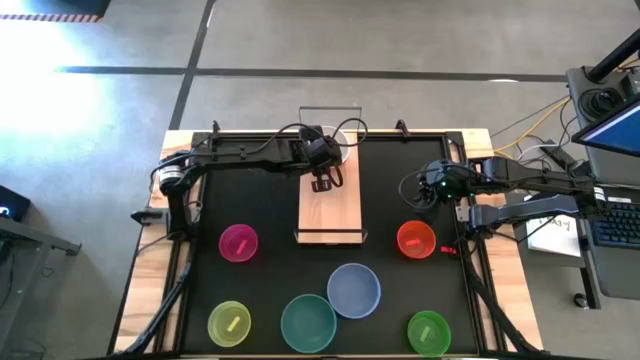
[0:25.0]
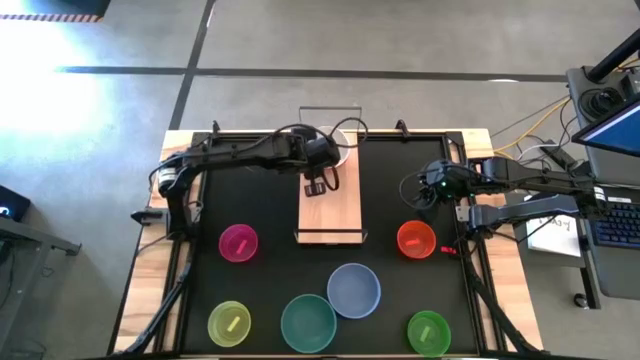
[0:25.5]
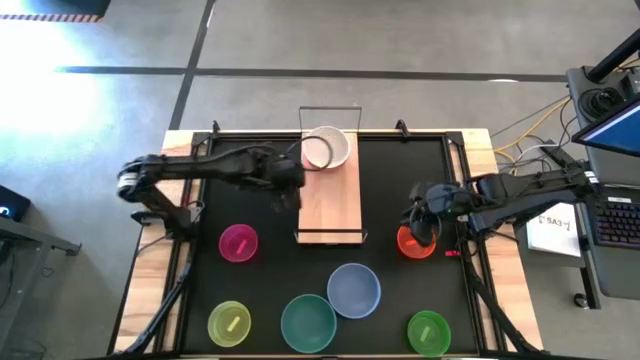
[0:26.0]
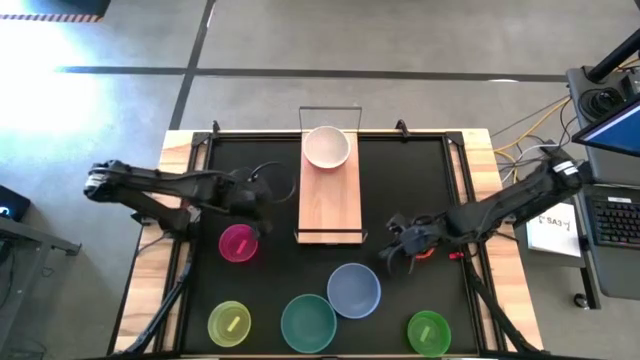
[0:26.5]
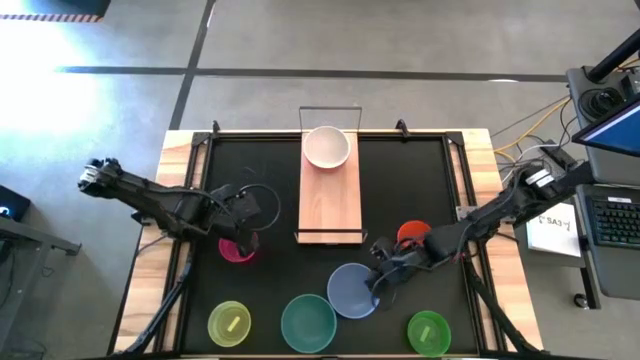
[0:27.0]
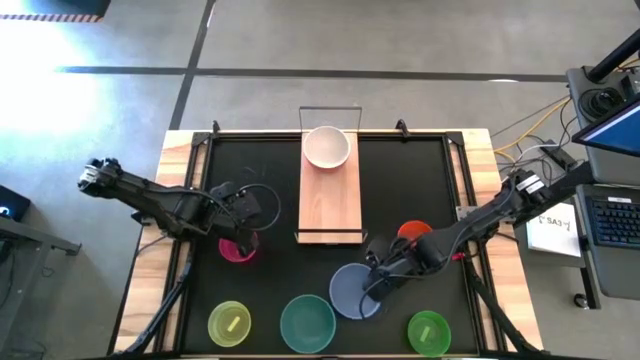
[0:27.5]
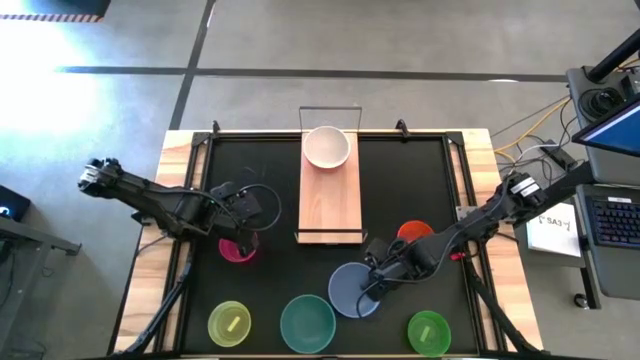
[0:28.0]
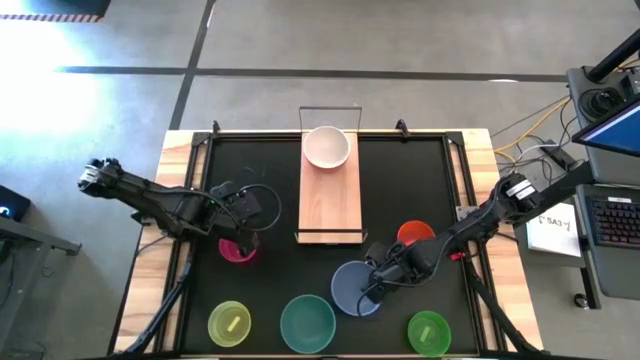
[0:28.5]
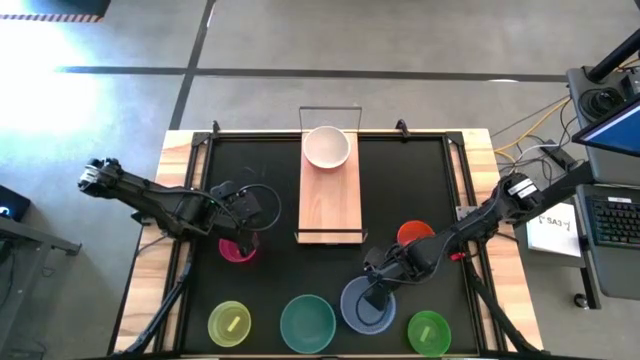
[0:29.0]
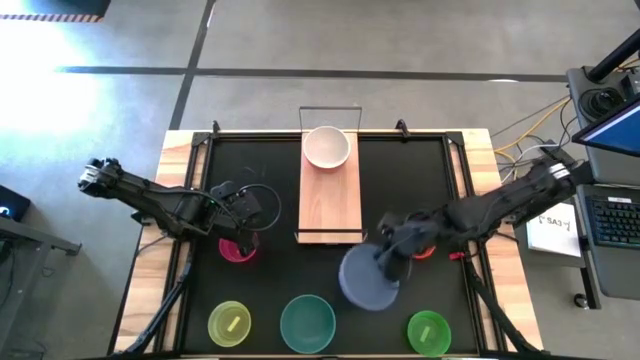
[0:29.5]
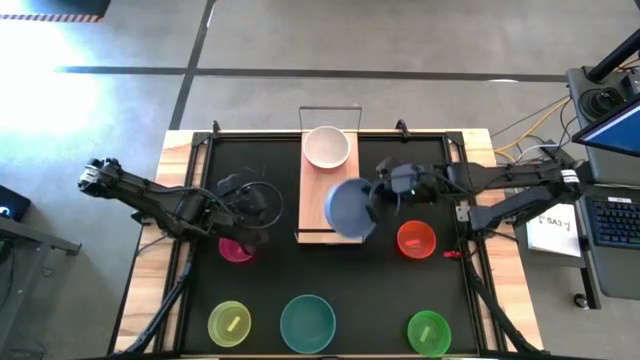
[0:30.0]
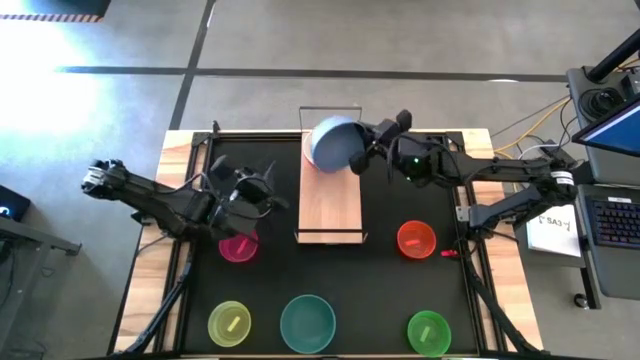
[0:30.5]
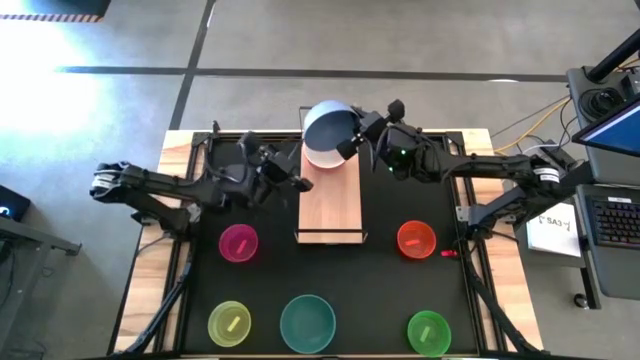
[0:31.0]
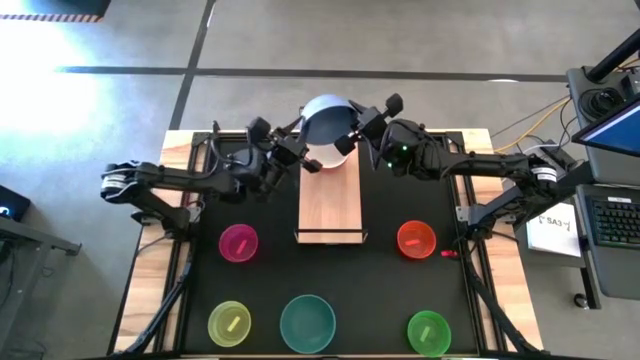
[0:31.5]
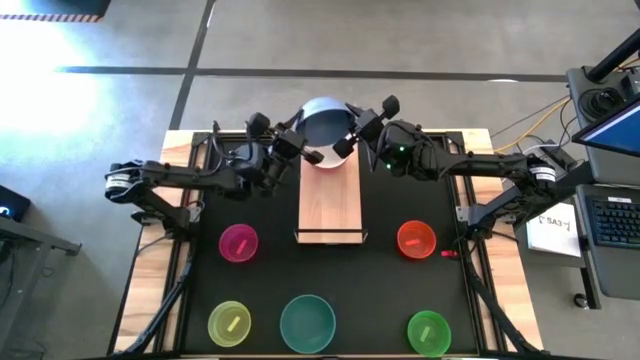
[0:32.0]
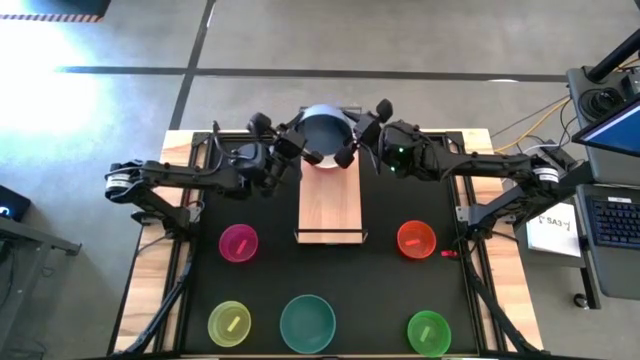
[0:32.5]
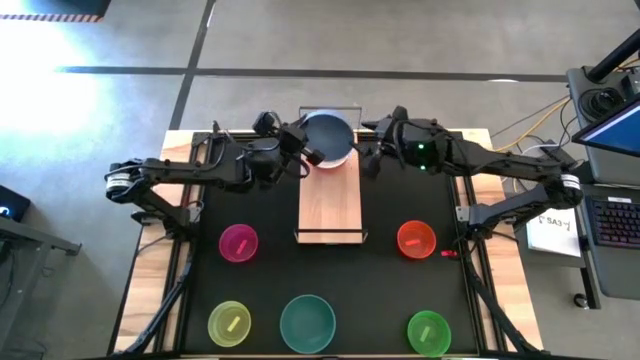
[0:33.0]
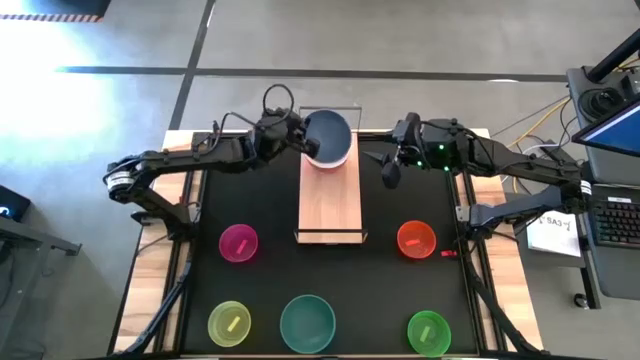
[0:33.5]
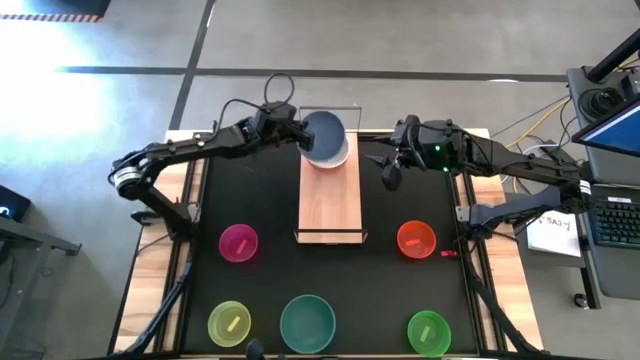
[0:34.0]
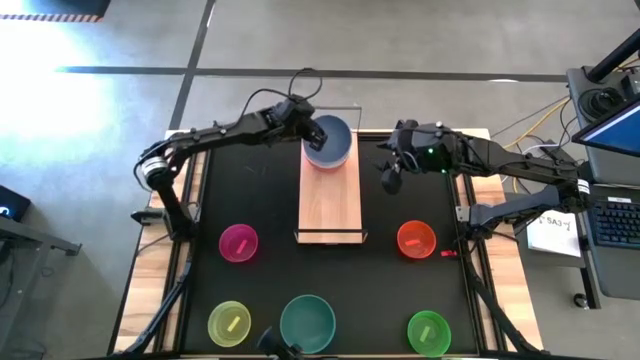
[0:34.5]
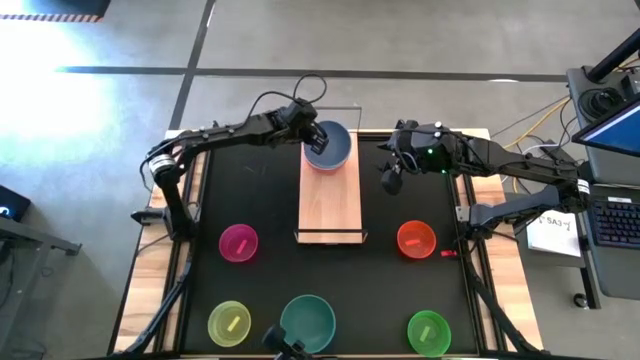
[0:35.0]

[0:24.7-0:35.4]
Task: Place and stack bowls onto a shelf
Stack the large blue bowl on top of the large white bowl on the shelf

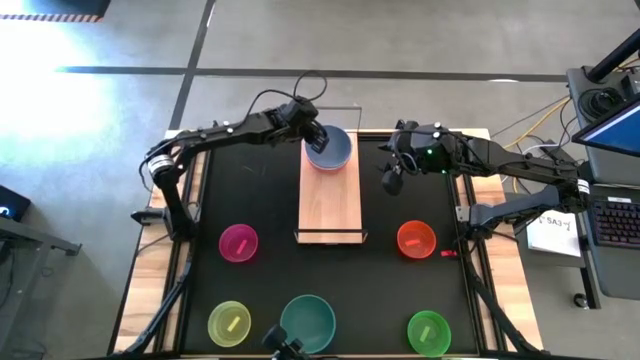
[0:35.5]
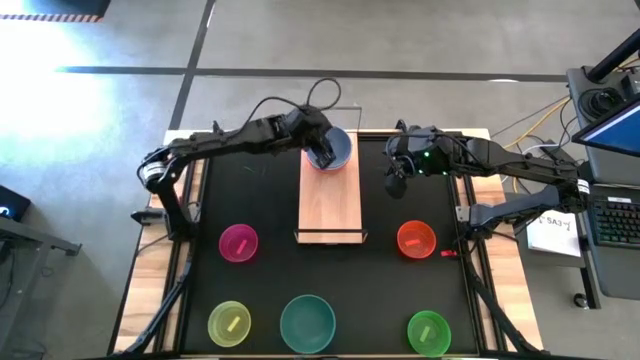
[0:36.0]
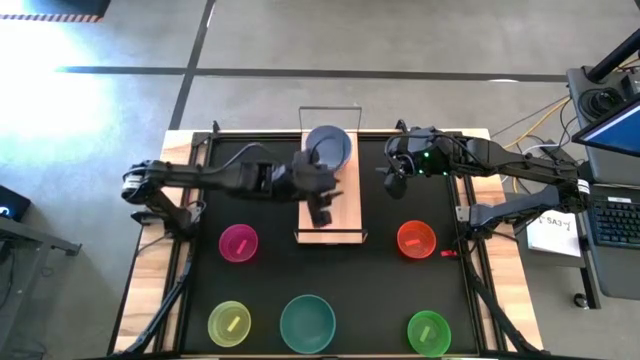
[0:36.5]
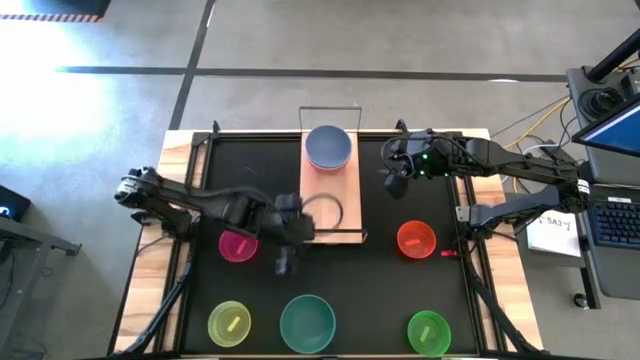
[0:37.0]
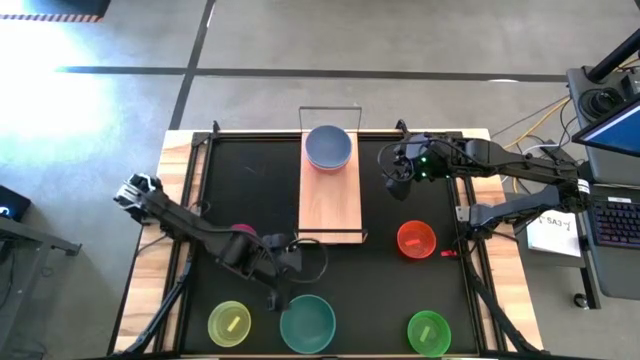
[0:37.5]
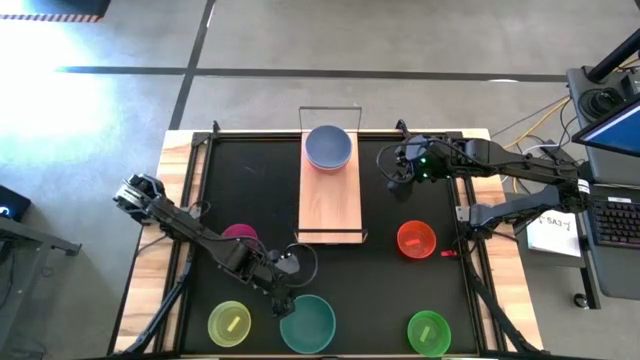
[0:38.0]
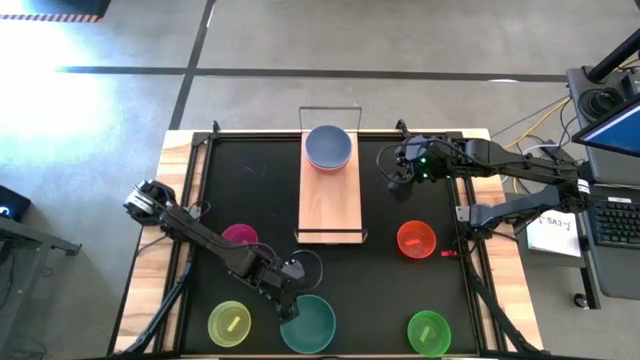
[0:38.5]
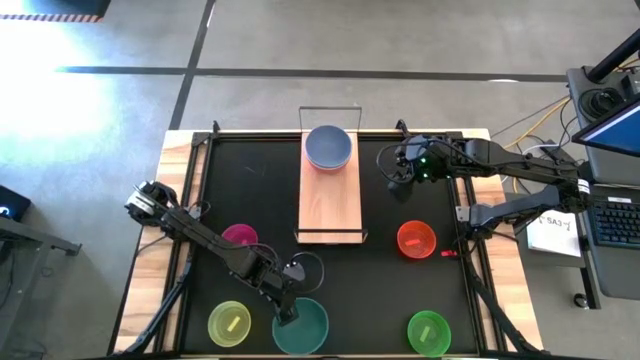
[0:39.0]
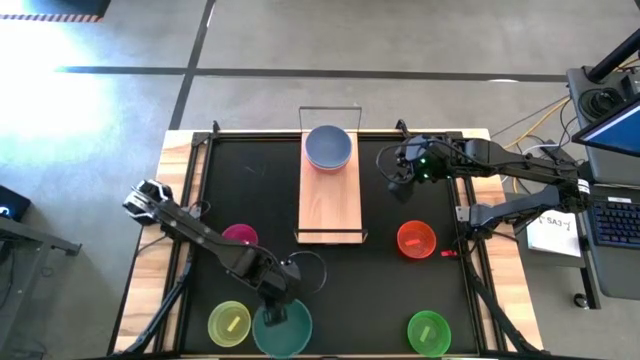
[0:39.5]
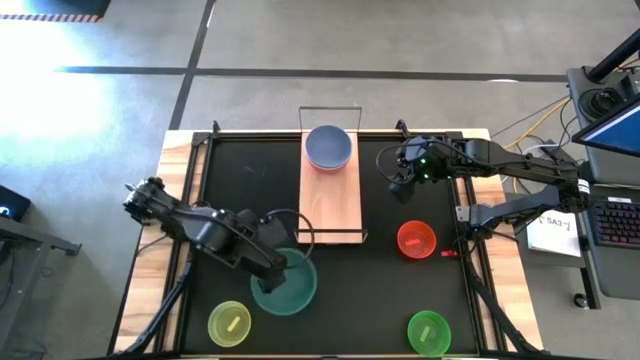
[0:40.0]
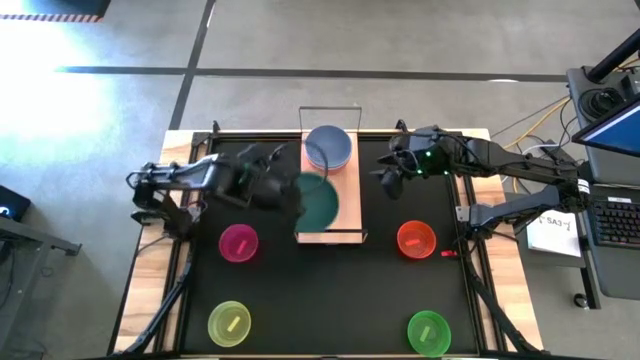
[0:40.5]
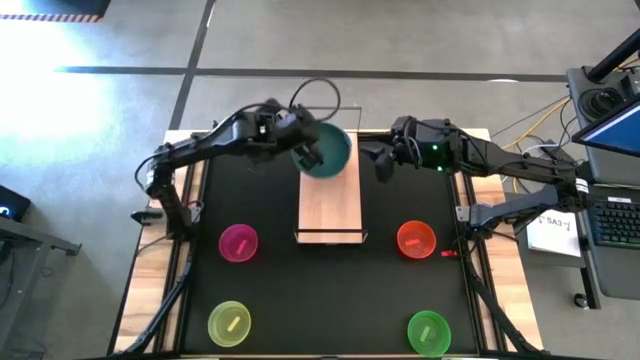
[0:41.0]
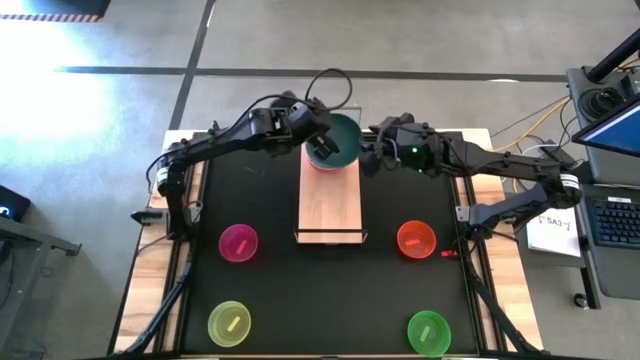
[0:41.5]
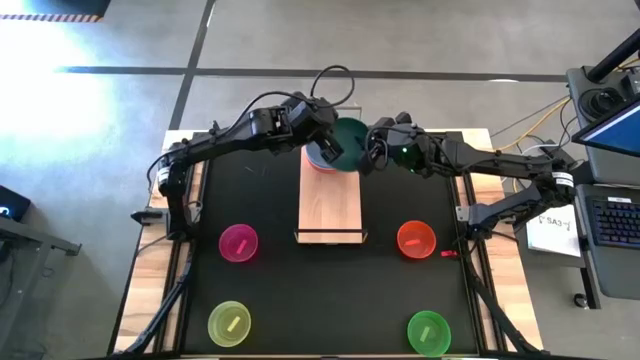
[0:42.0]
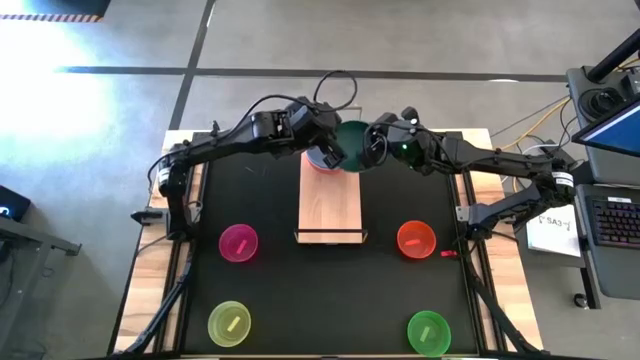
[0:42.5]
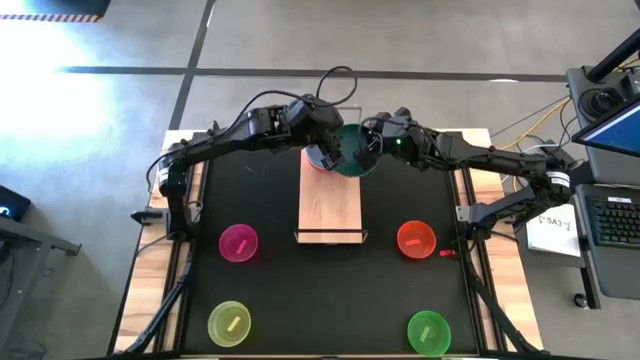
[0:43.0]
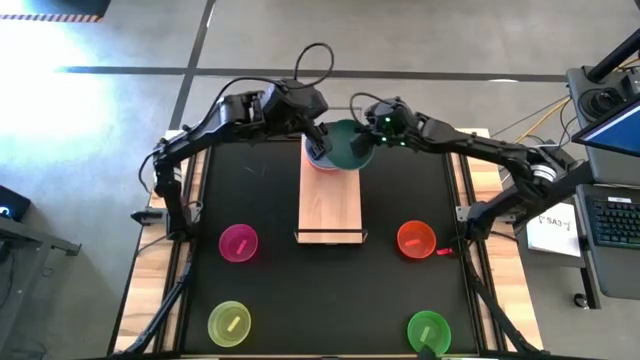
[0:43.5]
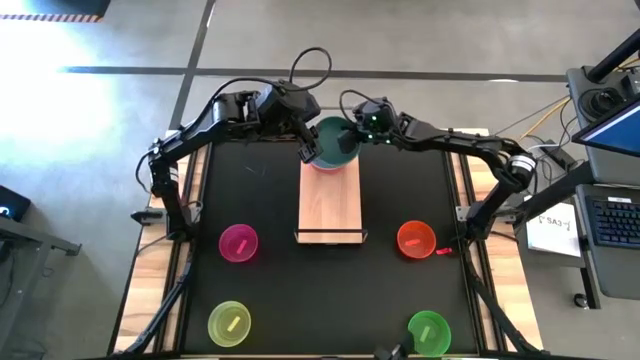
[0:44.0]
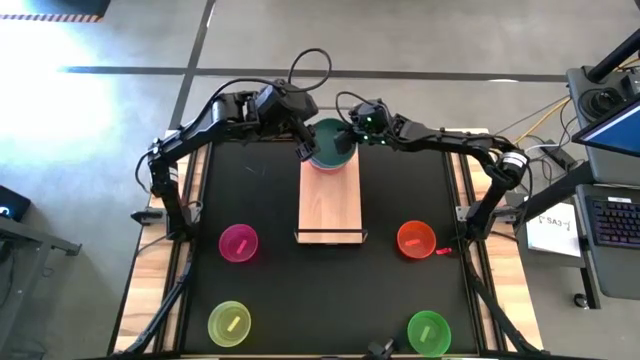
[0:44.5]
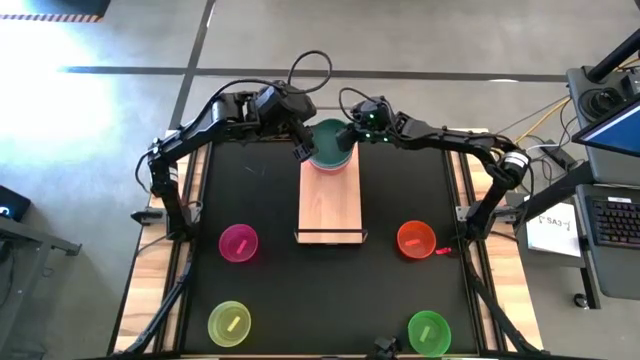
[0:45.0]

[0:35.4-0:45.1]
Stack the large green bowl on top of the large blue bowl on the shelf

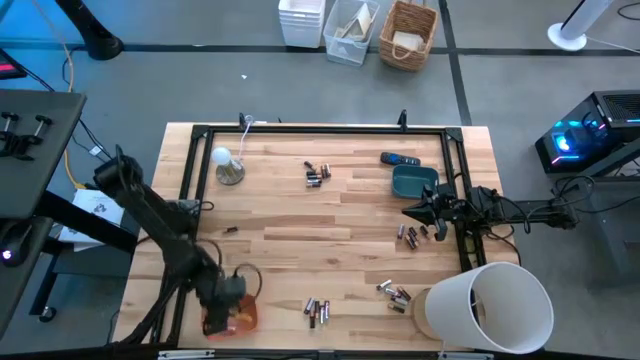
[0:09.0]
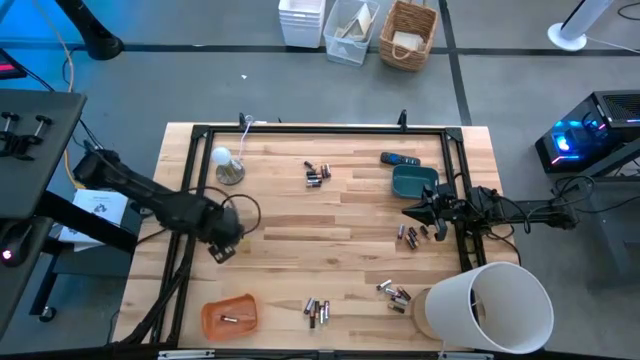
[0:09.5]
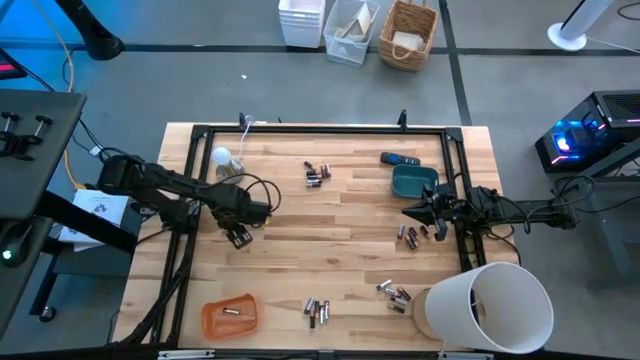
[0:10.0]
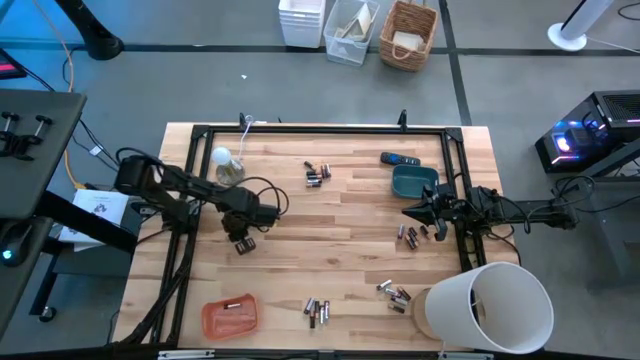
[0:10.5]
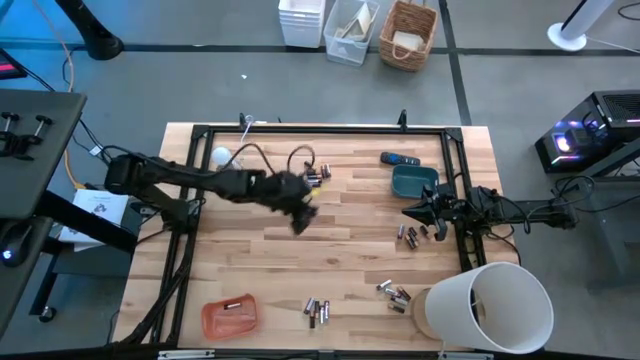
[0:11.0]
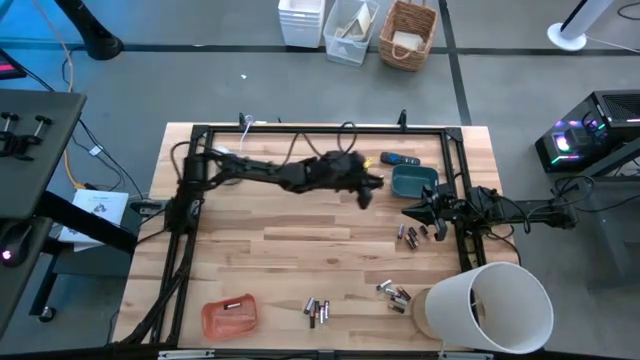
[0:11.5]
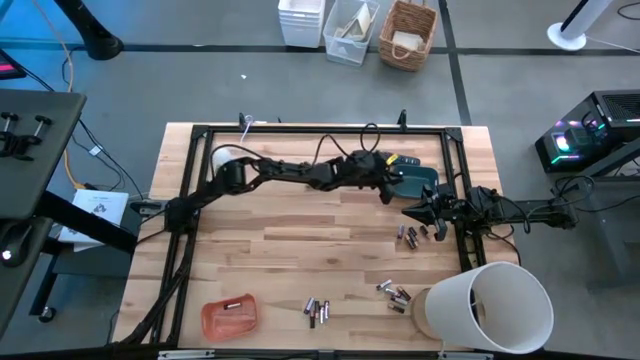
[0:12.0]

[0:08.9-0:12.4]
Task: Sort batteries
Put the black battery into the blue bin
